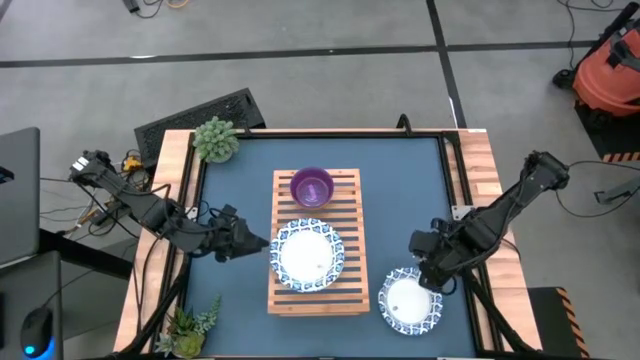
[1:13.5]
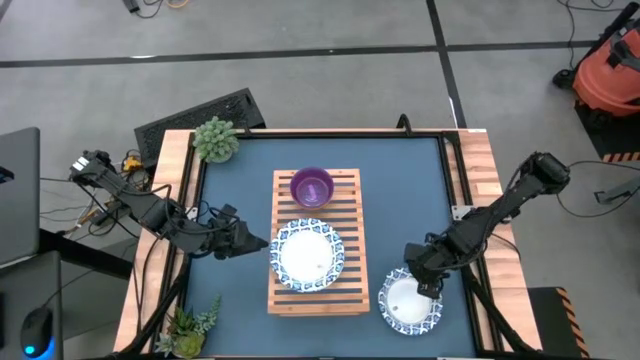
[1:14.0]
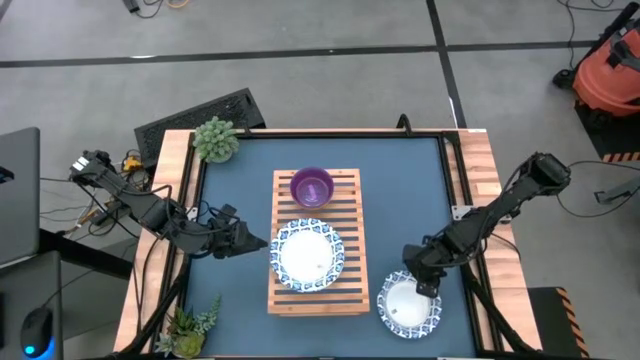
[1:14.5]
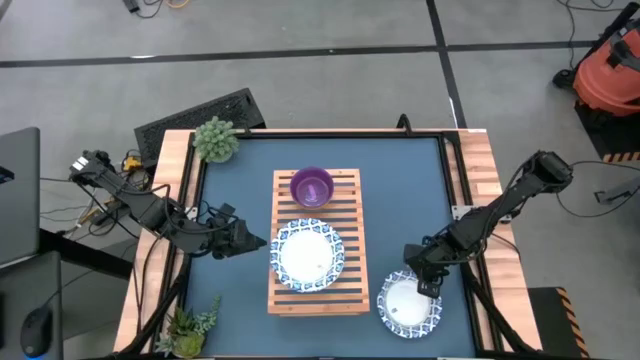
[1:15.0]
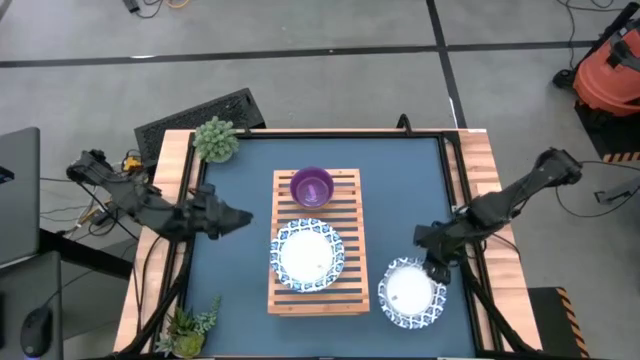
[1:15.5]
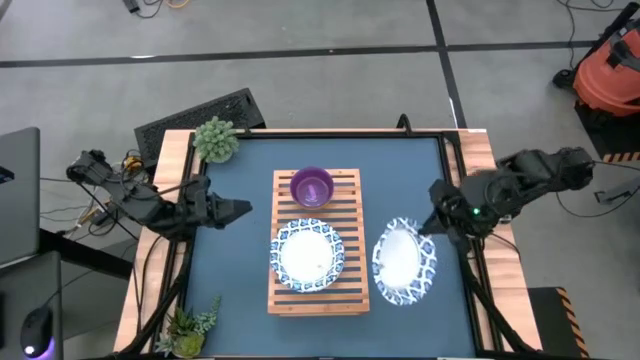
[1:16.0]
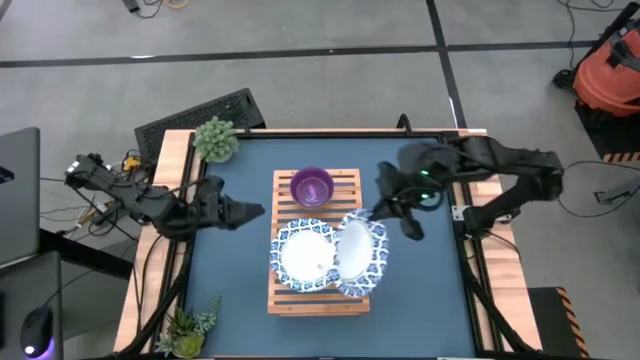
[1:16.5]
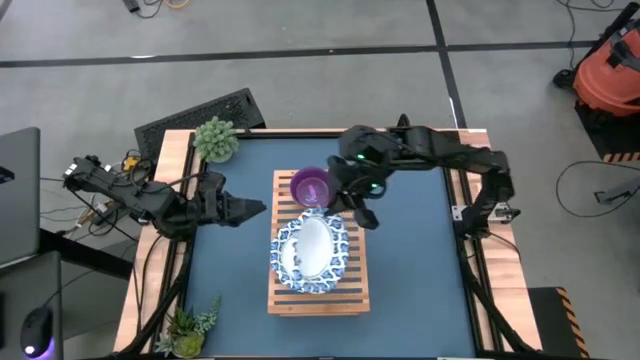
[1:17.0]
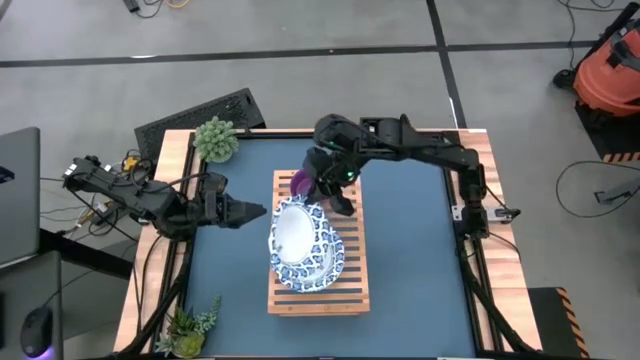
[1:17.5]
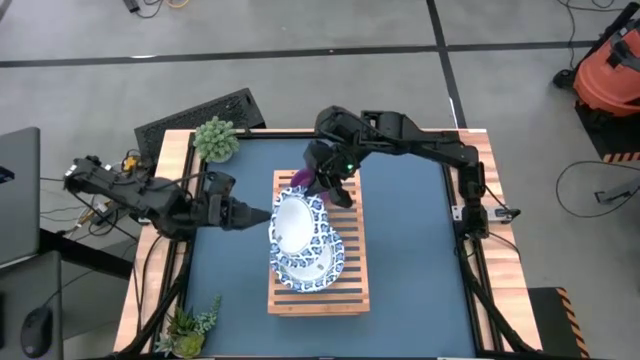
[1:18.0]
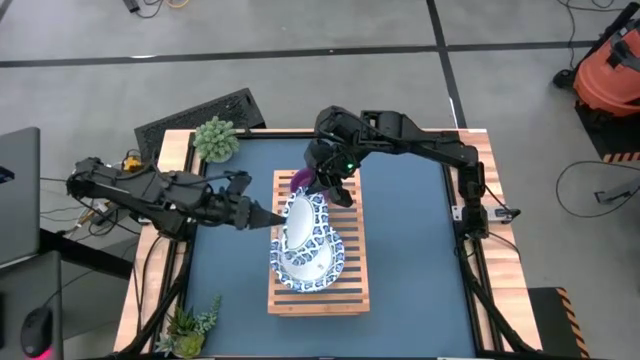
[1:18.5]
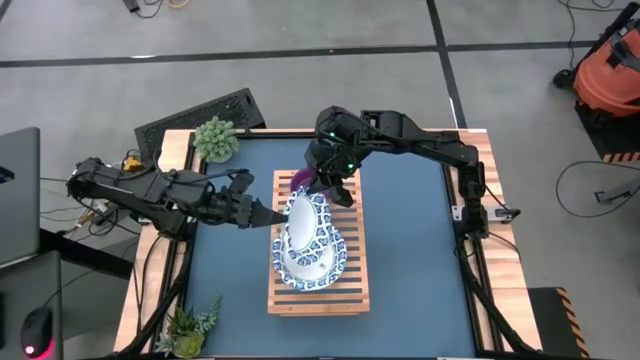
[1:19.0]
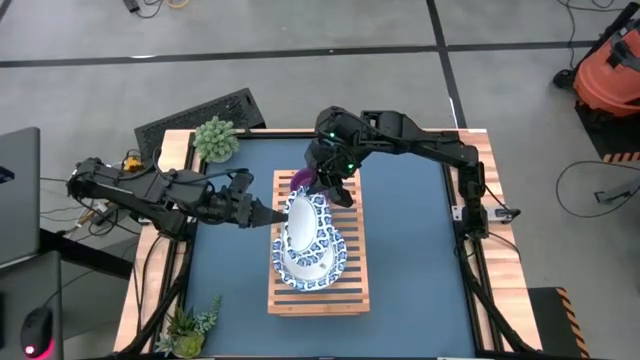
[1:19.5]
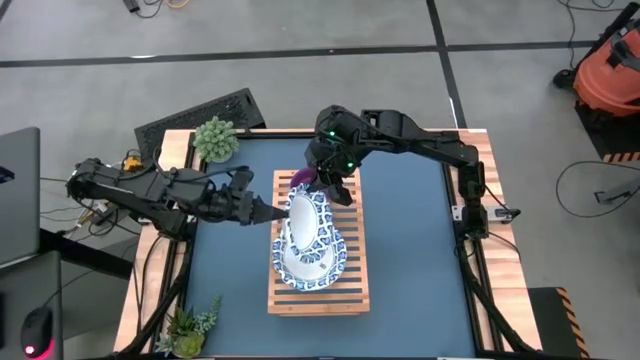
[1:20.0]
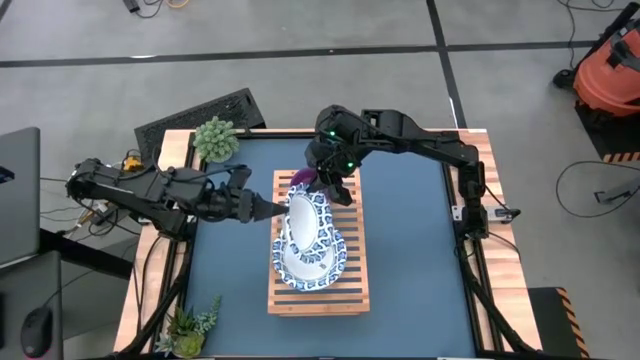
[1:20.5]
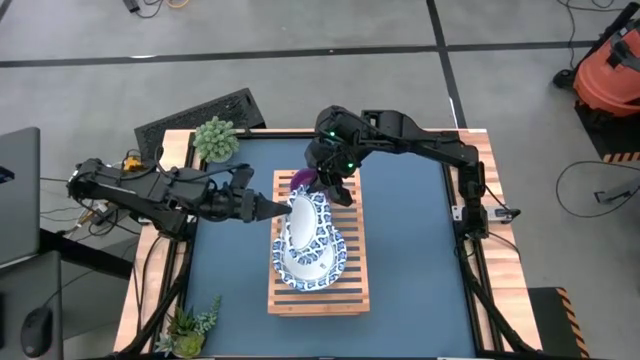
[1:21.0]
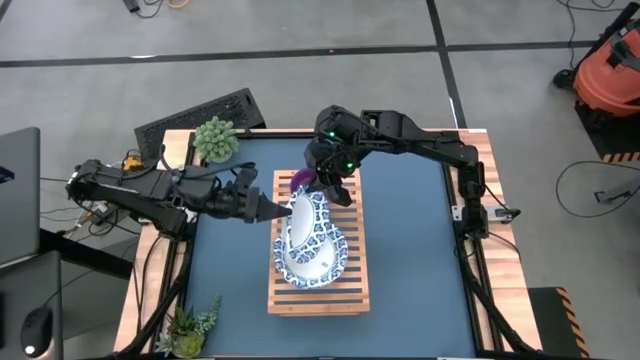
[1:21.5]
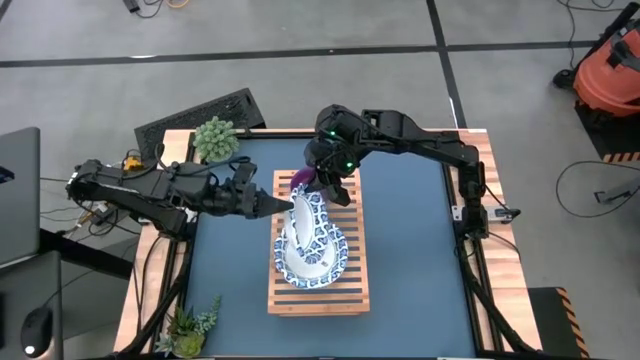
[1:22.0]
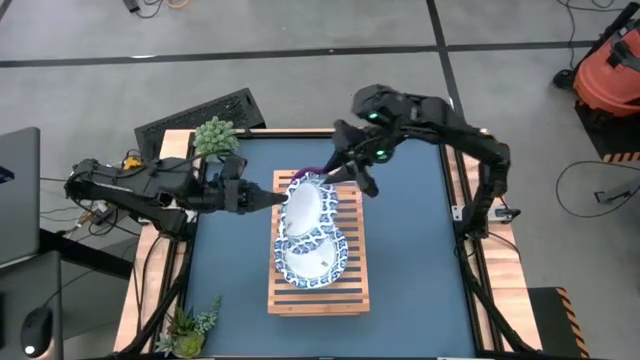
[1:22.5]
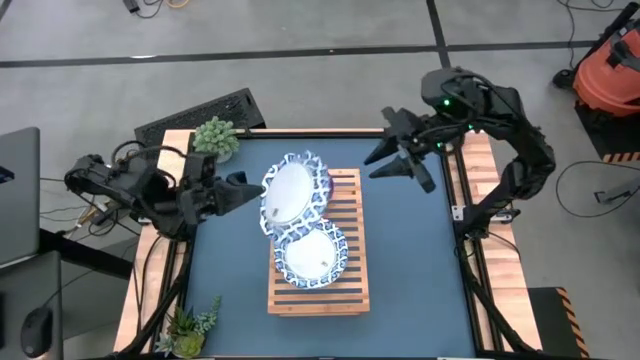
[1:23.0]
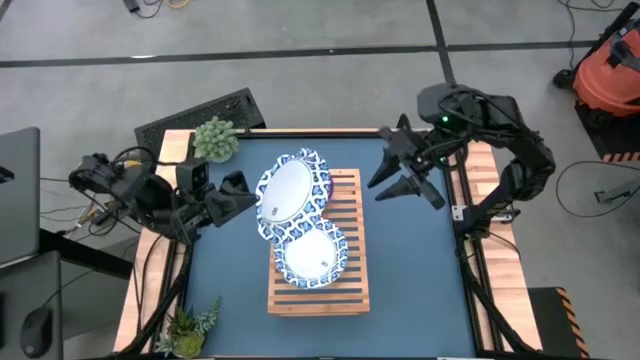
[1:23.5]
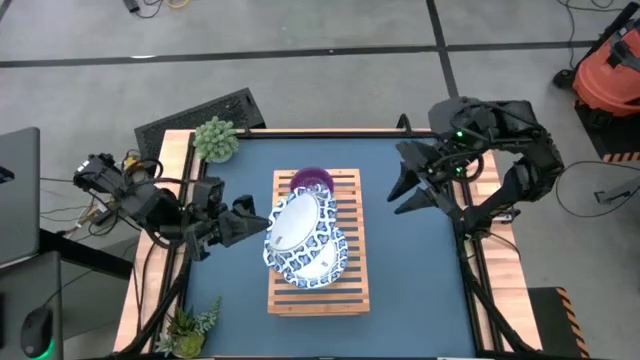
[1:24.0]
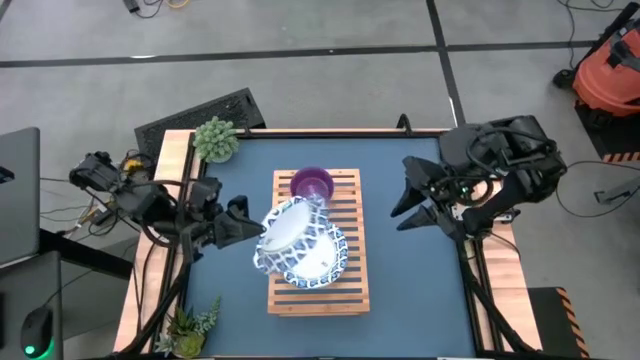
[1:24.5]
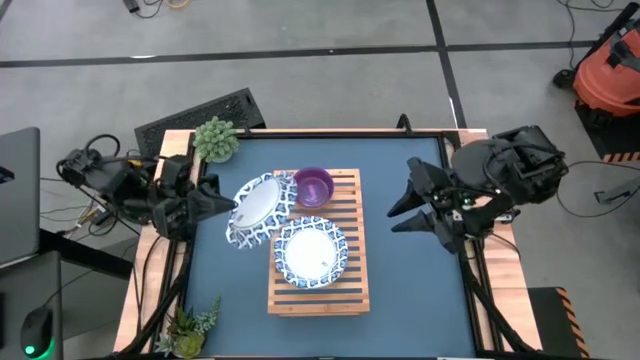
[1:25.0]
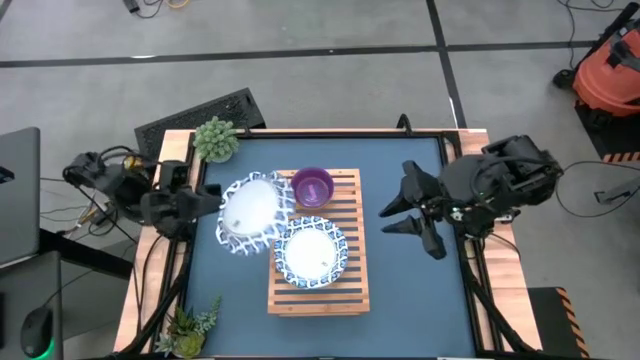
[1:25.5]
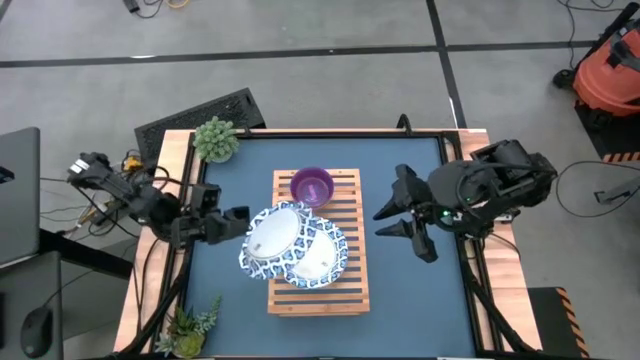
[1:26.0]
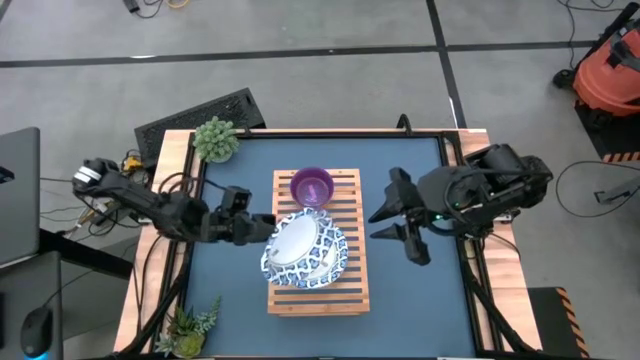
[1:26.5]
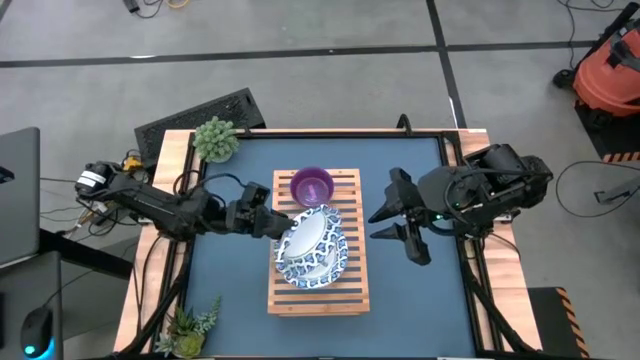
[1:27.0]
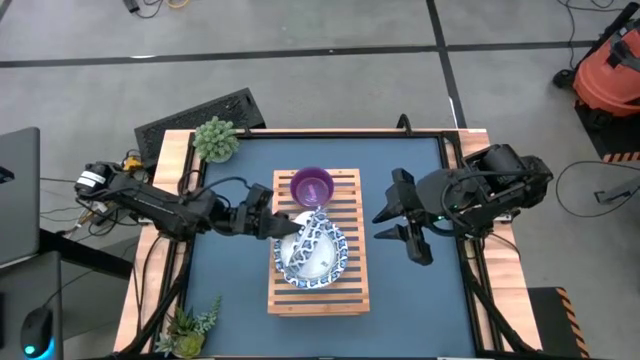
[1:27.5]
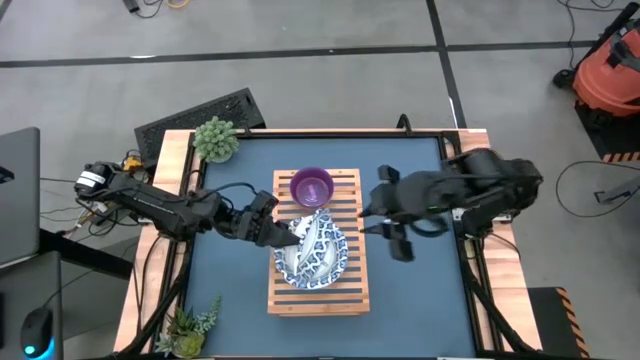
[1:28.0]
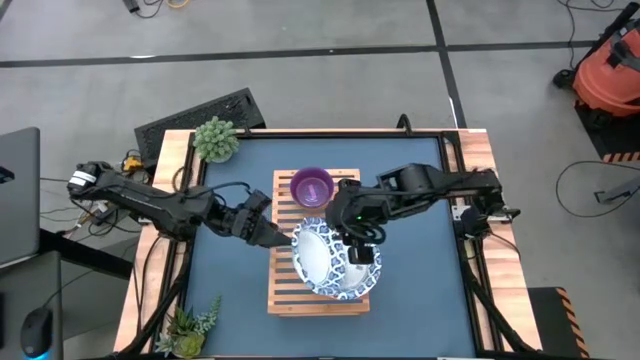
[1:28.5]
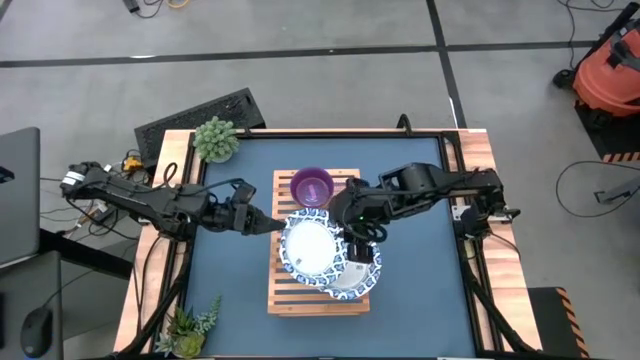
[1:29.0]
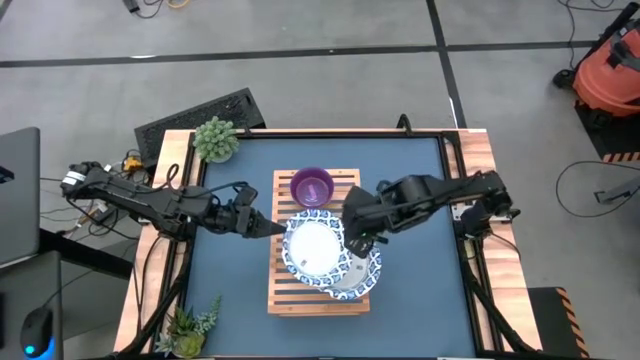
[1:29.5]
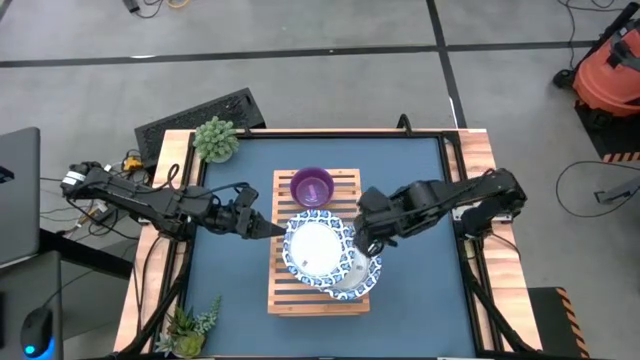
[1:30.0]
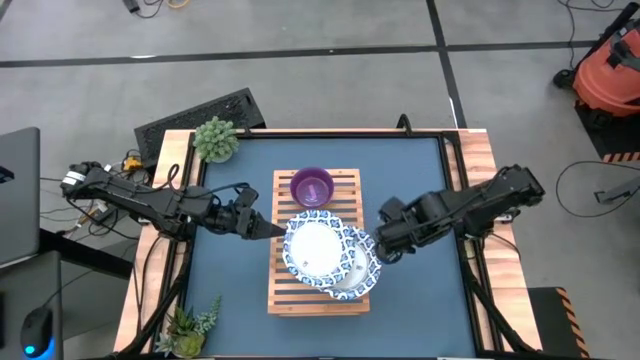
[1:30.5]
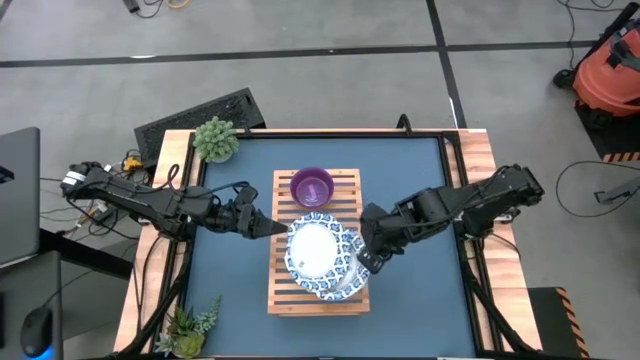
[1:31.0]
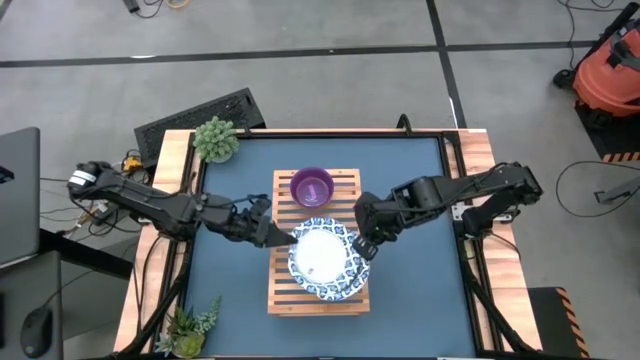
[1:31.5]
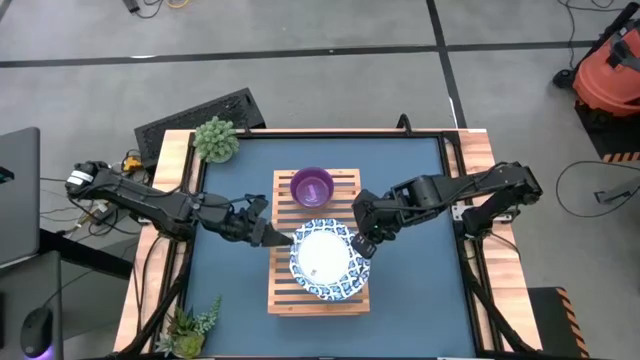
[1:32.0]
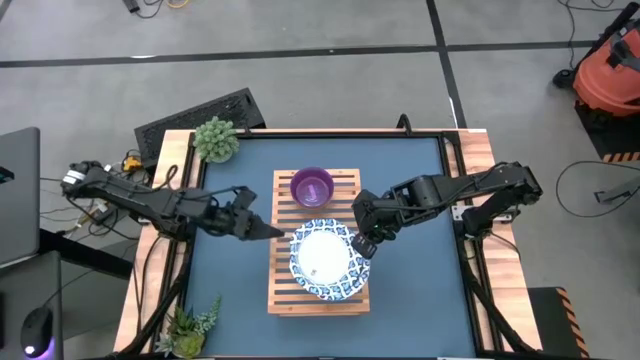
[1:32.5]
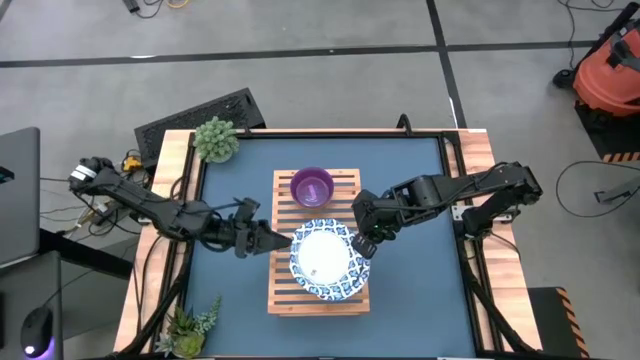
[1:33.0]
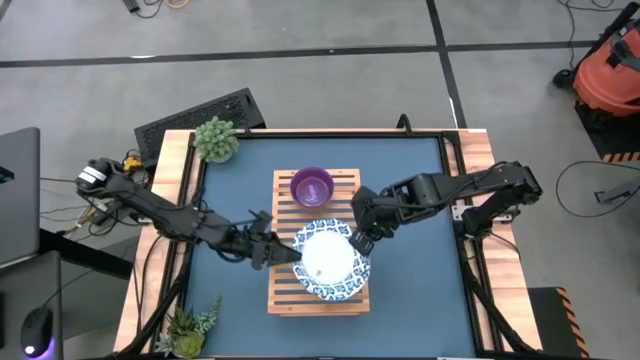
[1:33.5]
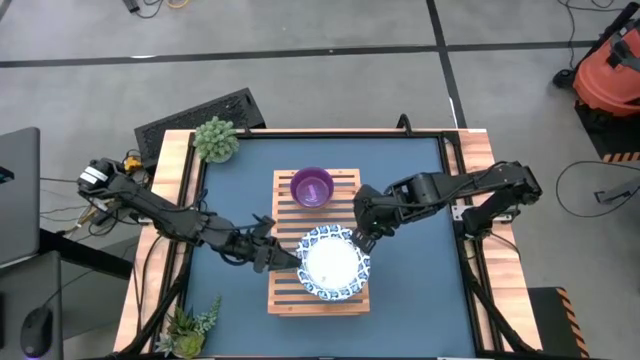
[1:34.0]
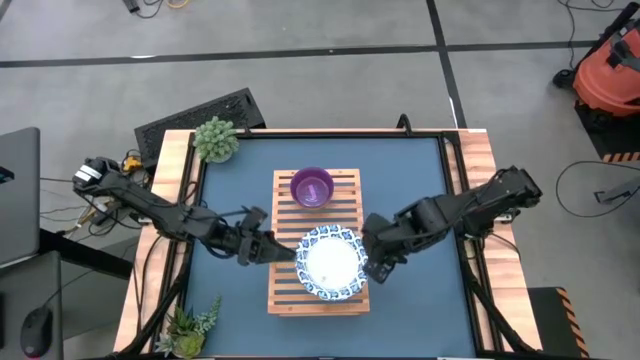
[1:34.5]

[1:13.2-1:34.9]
Task: Place and stack bowls onto a shelf
Stack the big white and blue bowl on top of the big white and blue bowl
